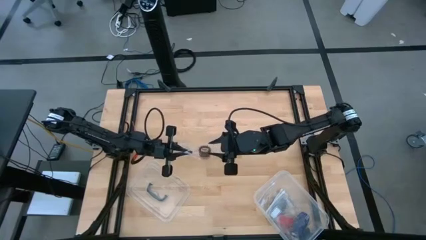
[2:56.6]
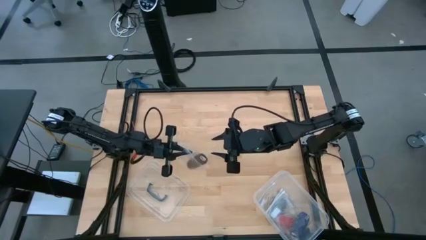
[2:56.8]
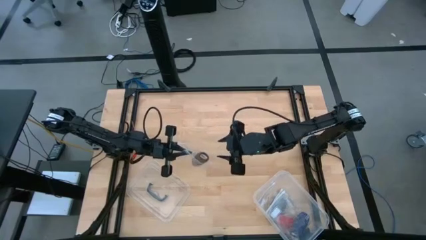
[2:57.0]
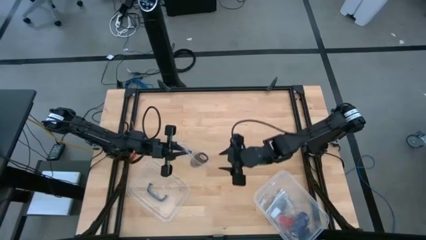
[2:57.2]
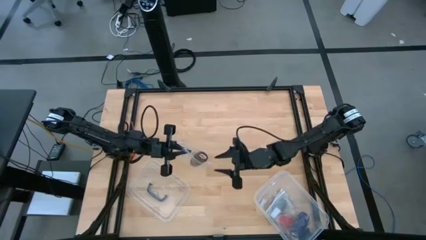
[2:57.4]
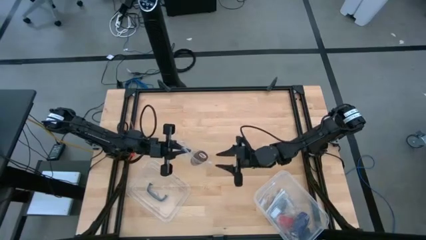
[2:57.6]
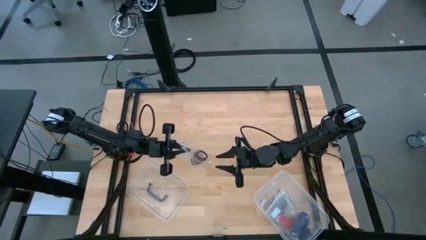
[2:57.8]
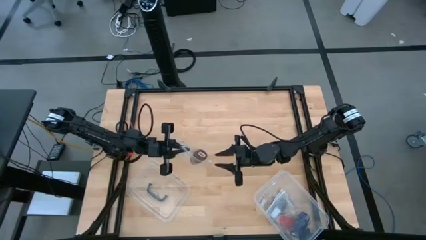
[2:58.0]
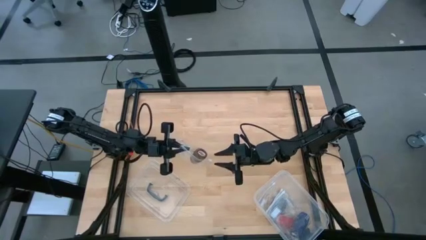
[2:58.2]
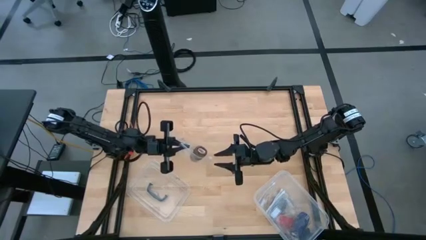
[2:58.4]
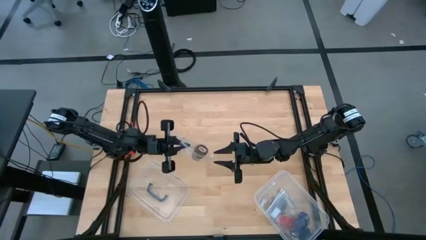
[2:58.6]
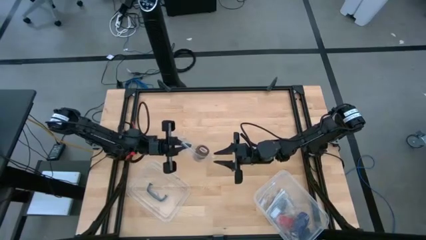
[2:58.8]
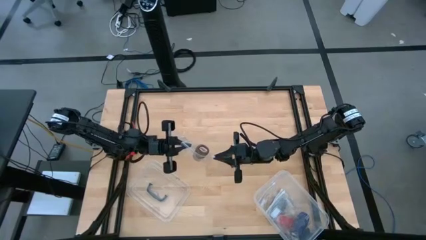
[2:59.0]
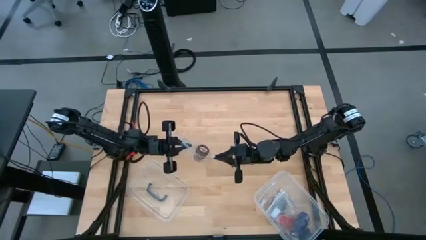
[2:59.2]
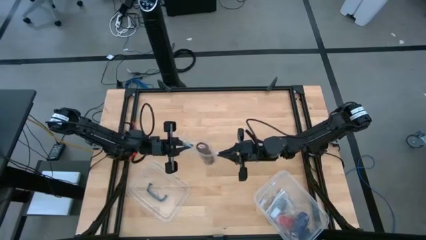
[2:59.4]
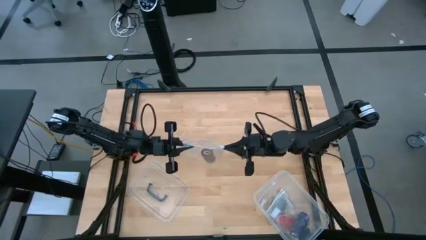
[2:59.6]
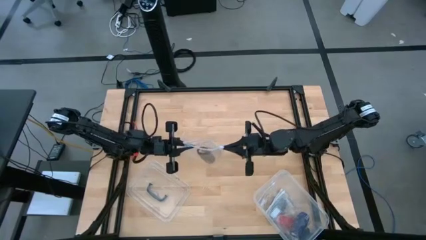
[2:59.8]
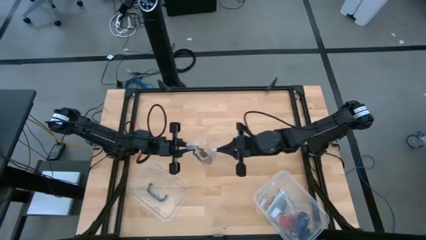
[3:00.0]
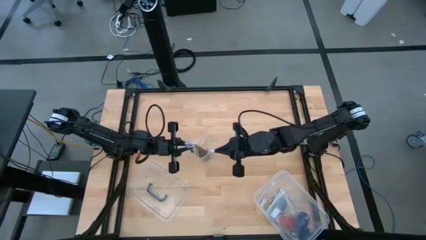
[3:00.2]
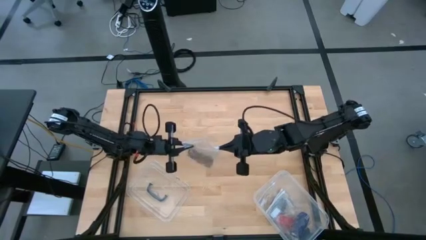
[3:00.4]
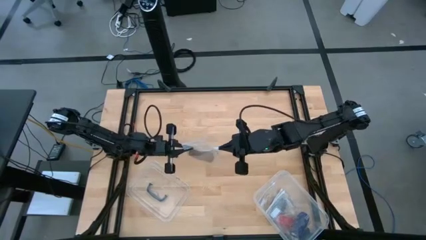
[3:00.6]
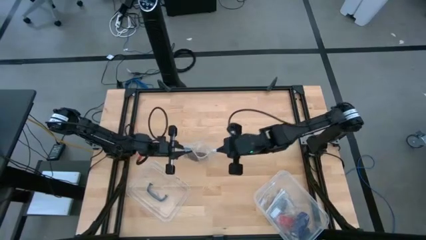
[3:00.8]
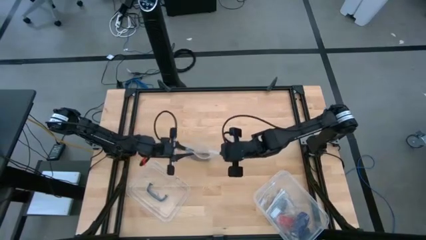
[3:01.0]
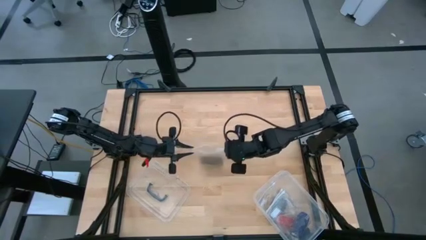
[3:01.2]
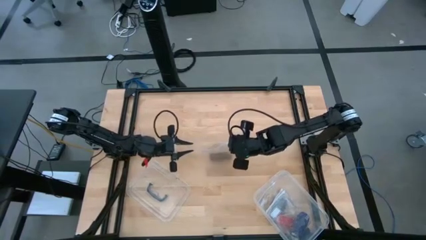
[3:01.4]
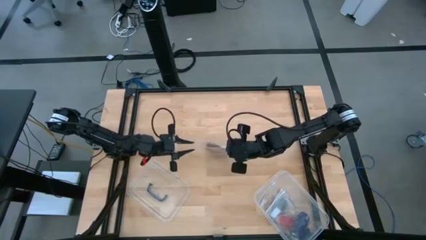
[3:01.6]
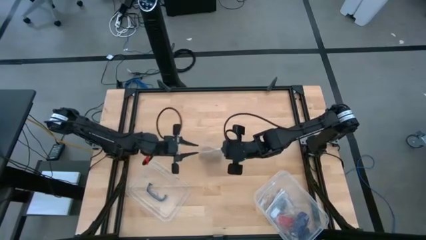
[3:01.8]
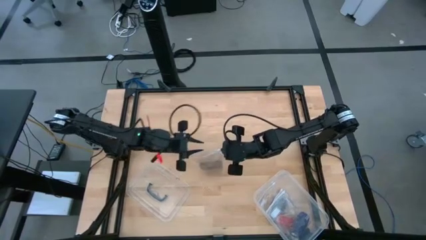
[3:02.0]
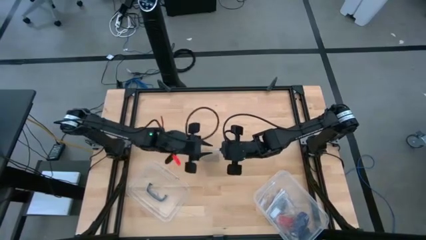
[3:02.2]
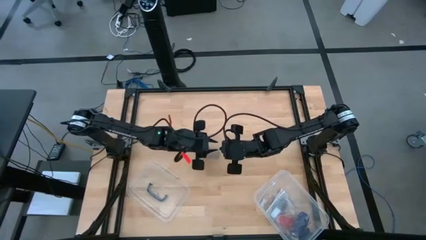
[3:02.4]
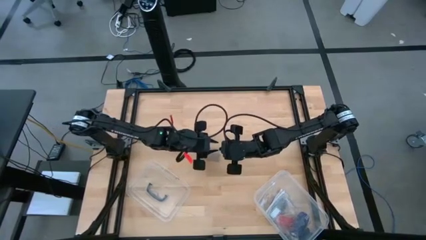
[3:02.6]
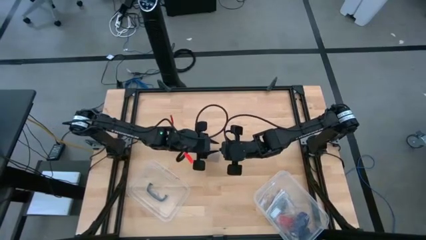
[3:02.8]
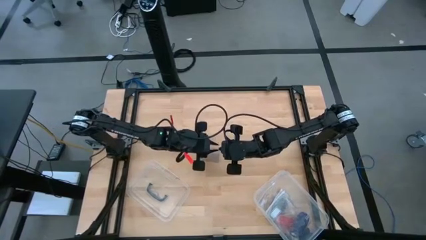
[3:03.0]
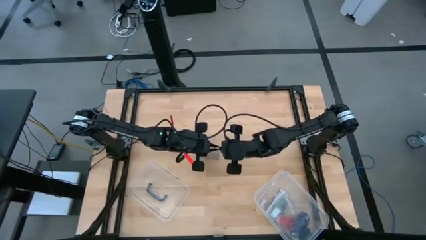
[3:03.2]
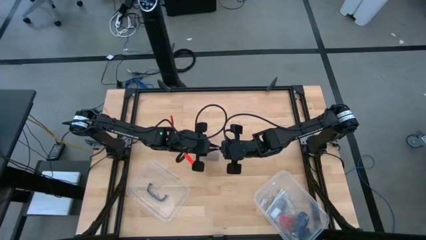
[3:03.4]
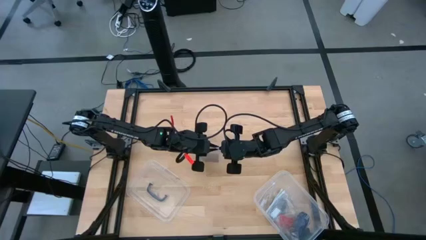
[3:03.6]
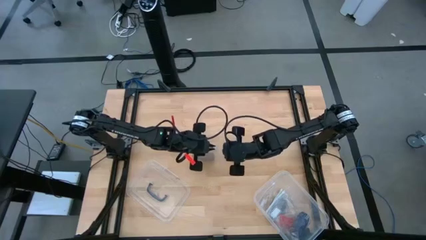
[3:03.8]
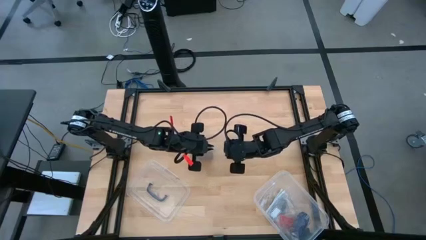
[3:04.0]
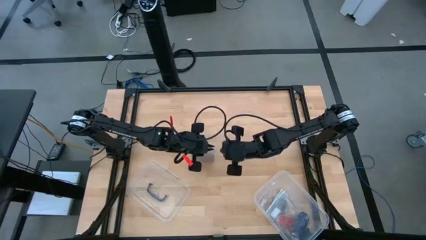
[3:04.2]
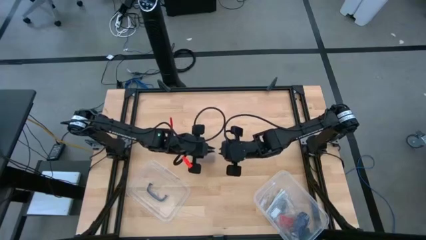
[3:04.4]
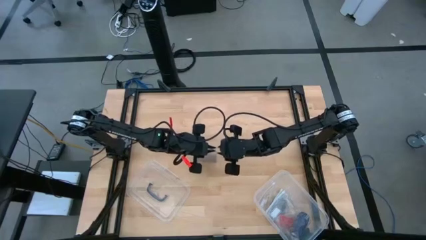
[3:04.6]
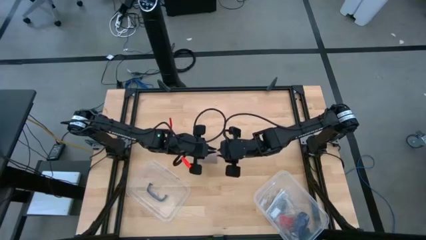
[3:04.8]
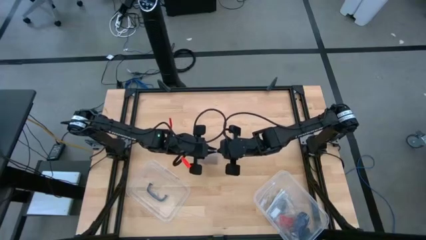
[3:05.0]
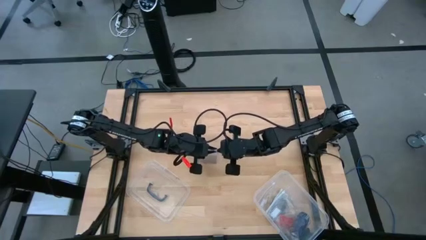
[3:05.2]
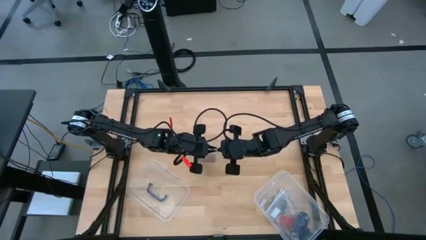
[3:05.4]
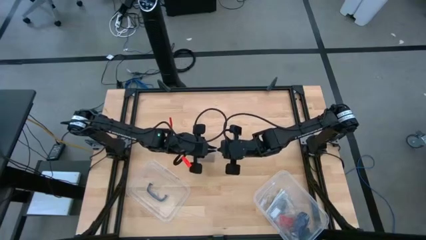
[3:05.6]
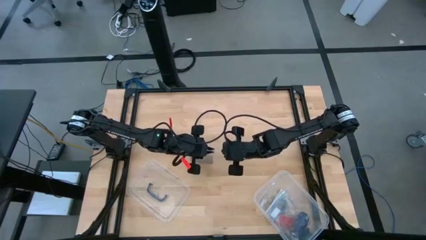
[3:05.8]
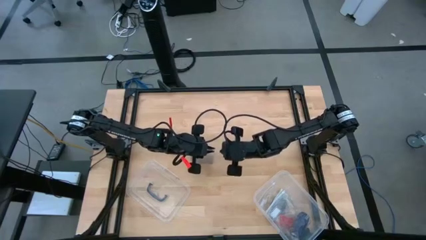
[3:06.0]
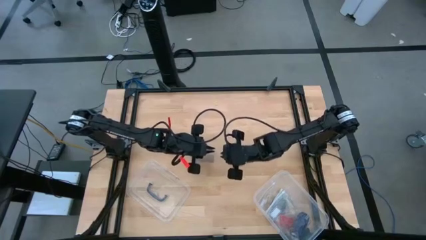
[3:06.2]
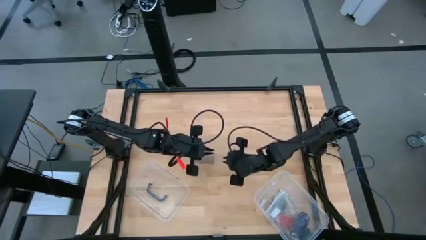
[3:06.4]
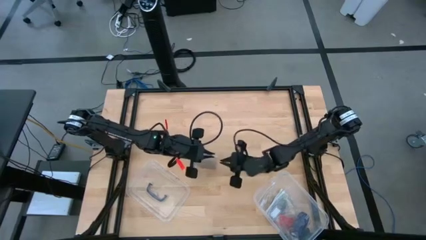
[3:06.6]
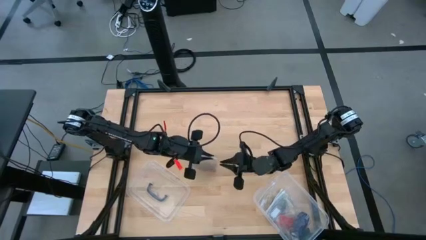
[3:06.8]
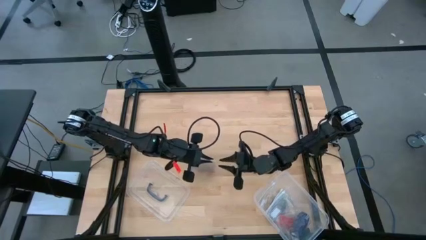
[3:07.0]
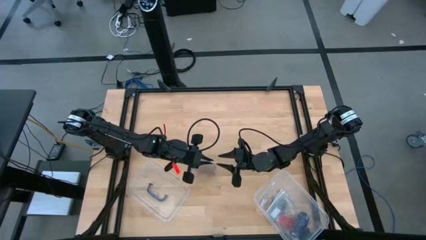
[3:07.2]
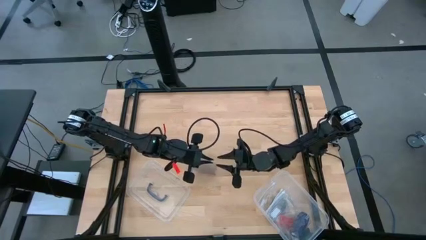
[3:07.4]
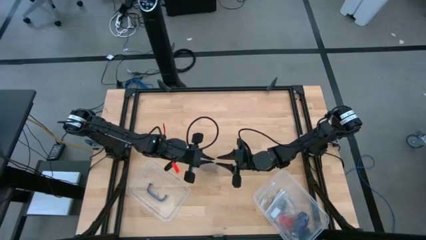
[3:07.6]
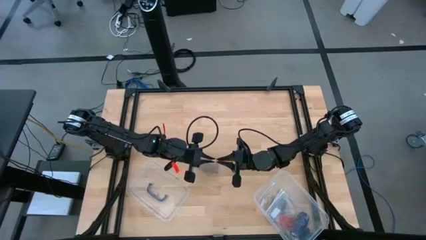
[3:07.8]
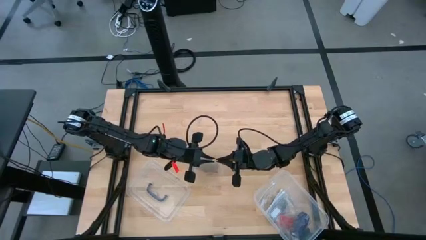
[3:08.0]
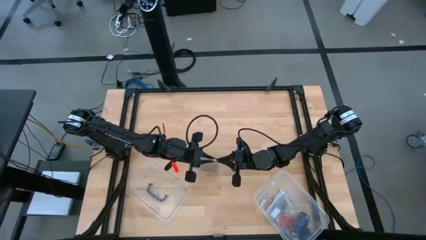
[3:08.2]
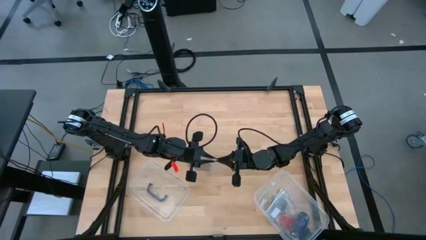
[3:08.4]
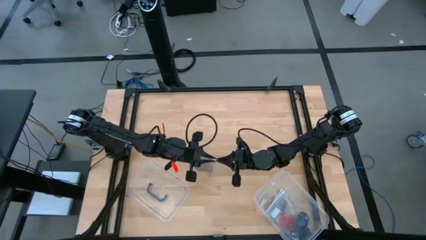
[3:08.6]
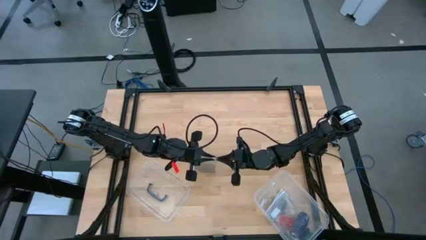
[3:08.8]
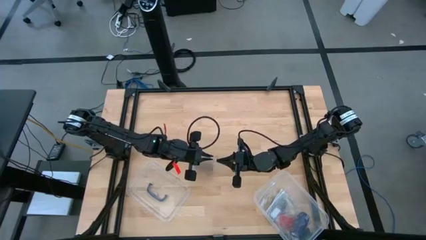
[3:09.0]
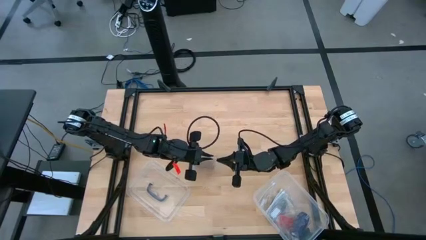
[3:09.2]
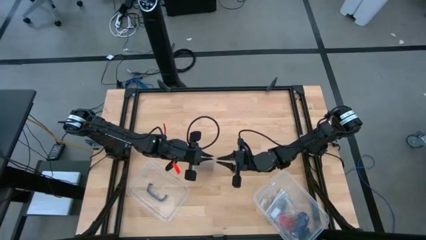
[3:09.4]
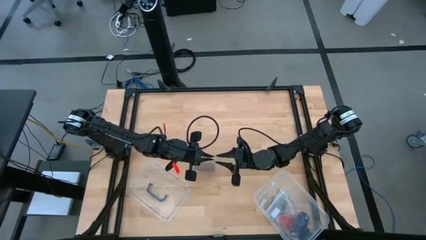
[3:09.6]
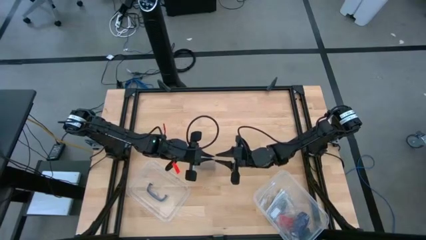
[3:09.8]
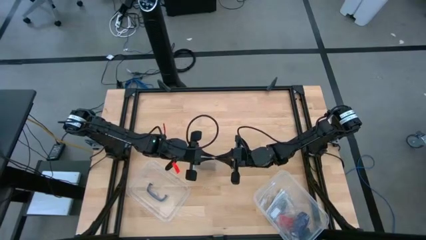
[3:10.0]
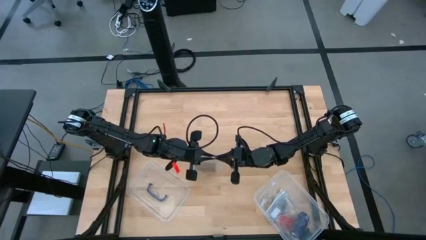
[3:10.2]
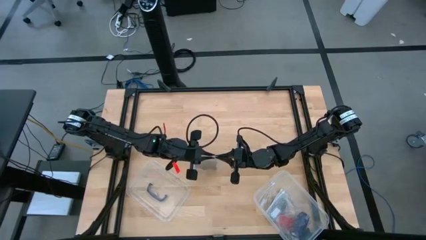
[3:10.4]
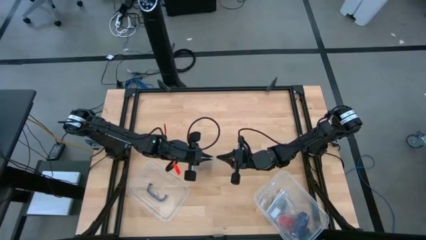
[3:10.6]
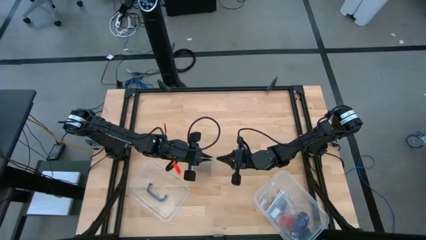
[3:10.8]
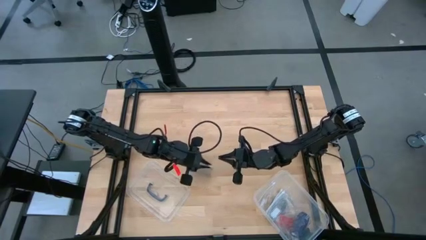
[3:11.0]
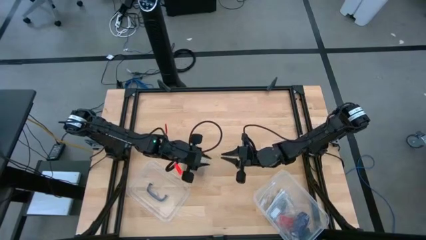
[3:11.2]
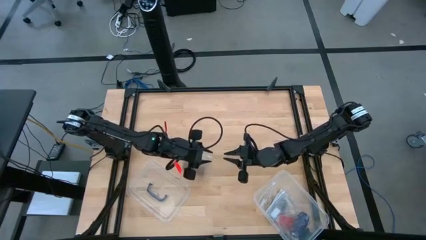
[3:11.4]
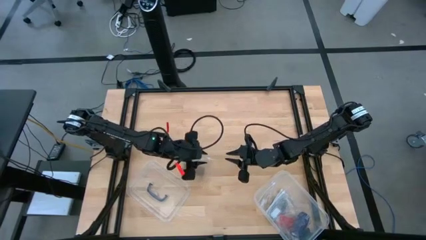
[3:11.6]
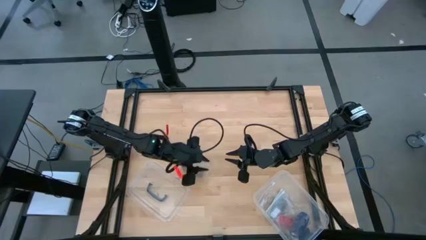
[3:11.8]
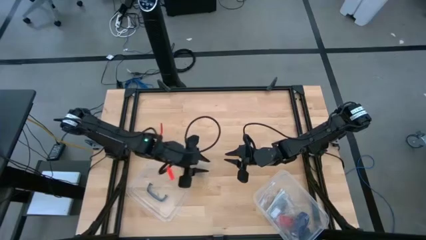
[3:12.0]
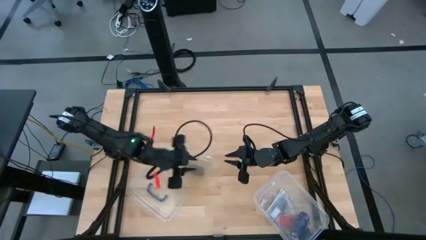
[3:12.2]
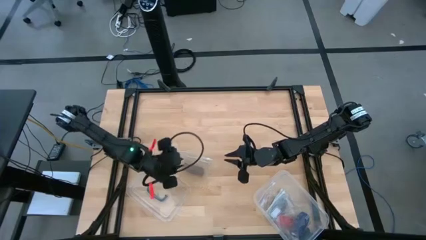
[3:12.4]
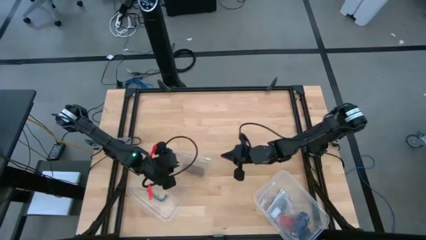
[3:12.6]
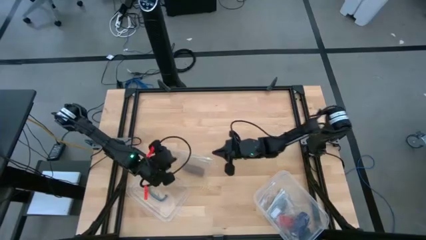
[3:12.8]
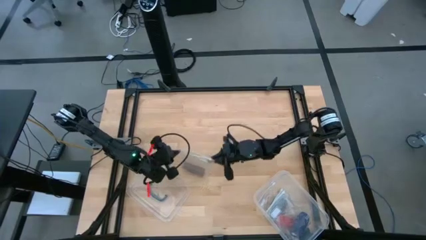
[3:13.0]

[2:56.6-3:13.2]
Task: Roll bandage
Close the transparent zip bag
